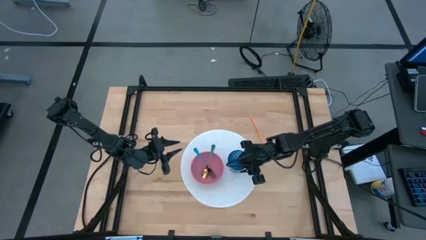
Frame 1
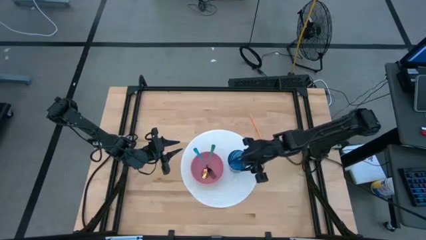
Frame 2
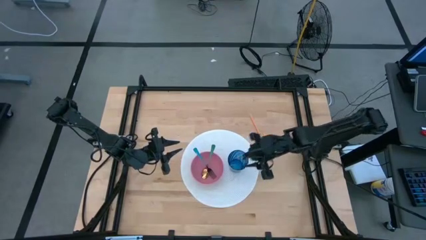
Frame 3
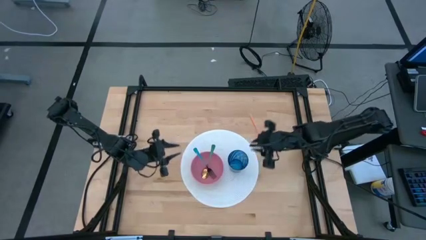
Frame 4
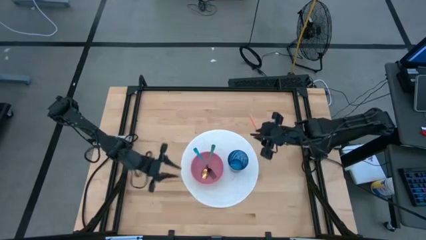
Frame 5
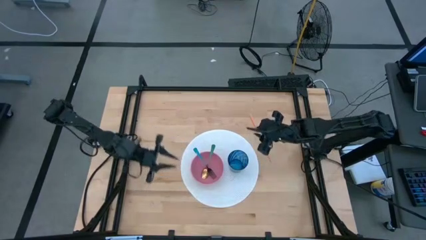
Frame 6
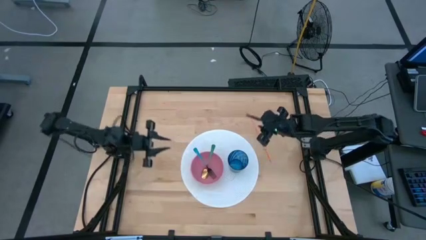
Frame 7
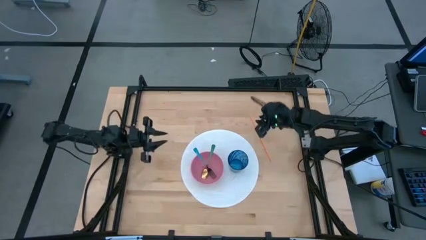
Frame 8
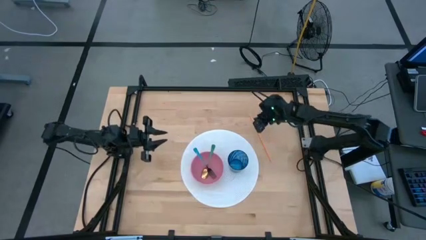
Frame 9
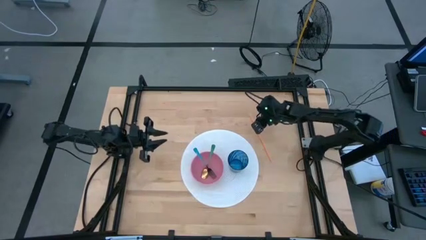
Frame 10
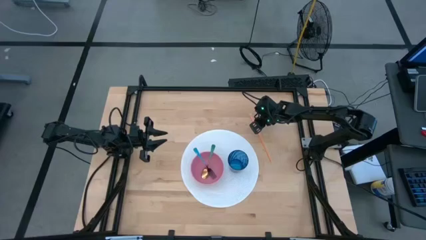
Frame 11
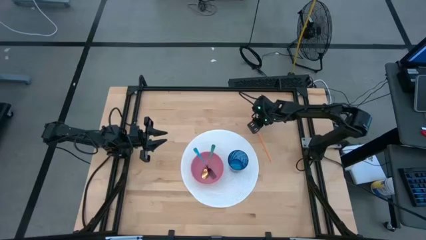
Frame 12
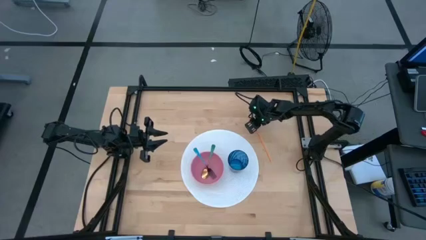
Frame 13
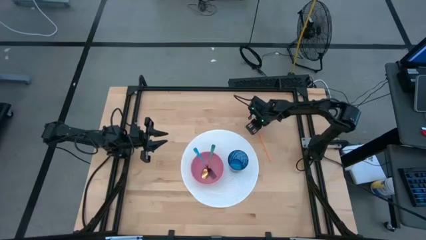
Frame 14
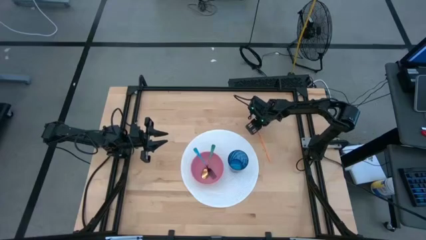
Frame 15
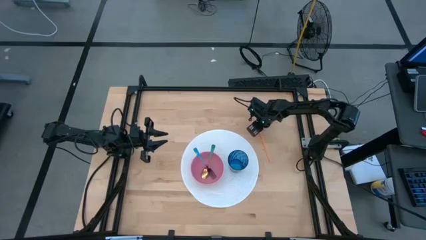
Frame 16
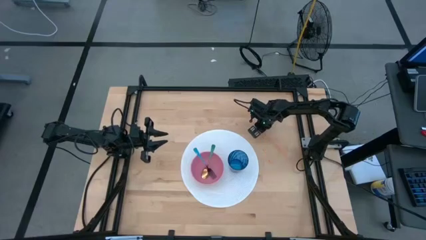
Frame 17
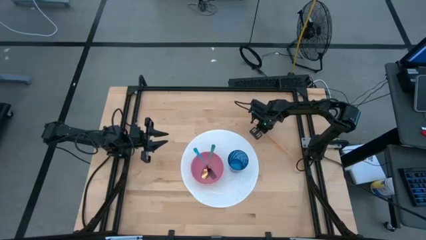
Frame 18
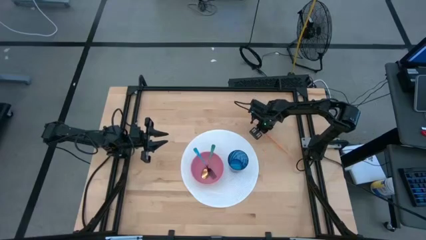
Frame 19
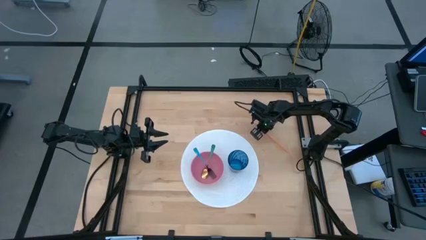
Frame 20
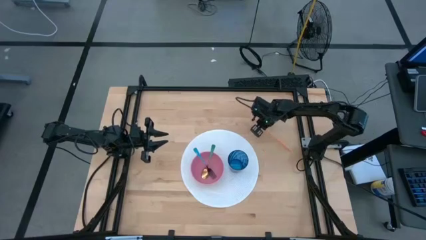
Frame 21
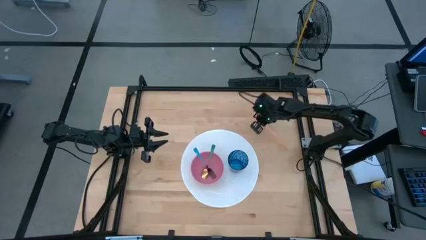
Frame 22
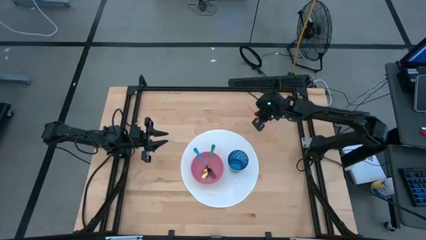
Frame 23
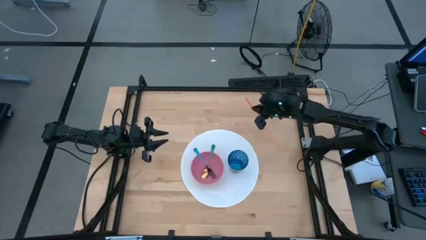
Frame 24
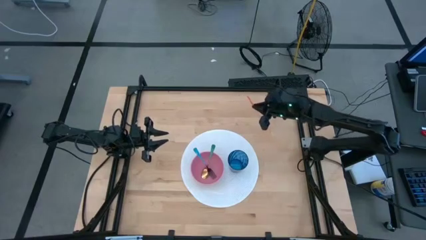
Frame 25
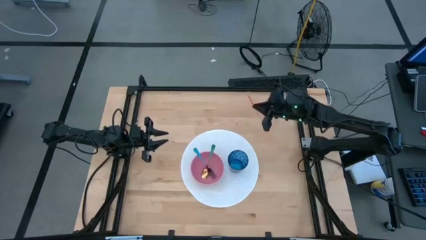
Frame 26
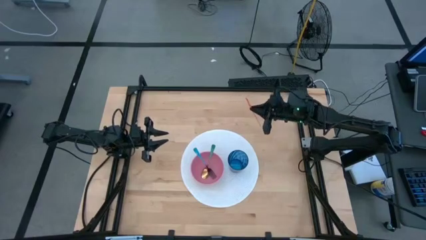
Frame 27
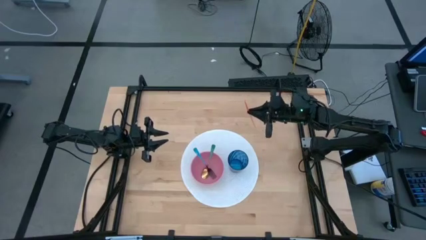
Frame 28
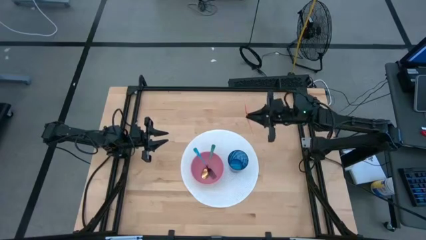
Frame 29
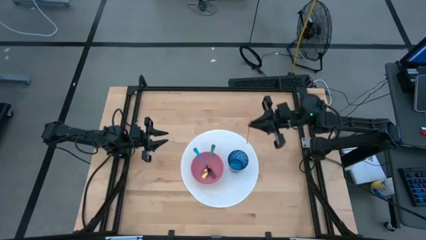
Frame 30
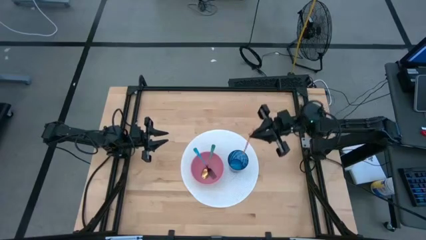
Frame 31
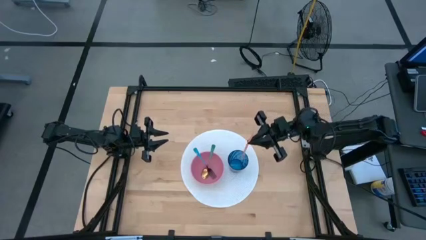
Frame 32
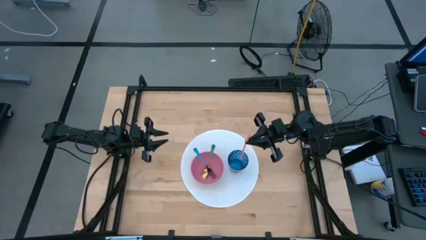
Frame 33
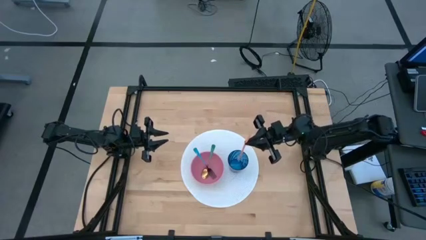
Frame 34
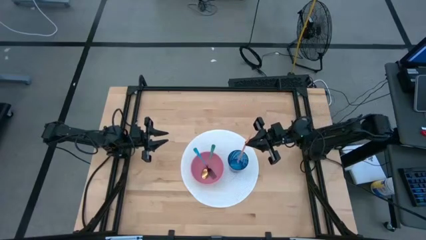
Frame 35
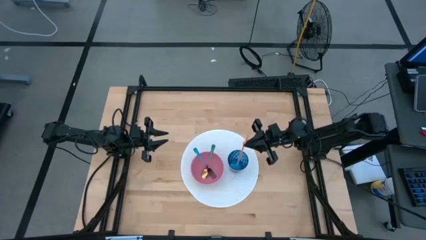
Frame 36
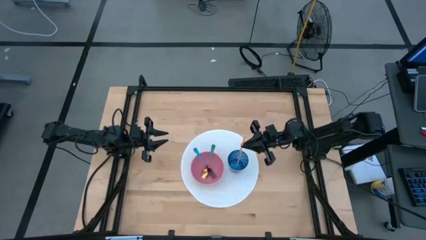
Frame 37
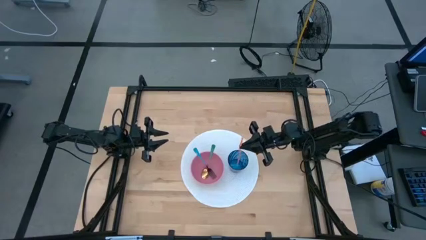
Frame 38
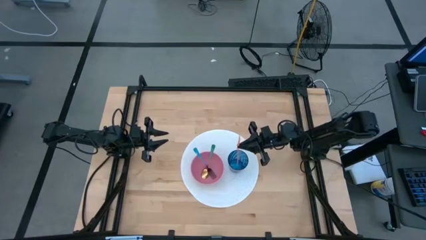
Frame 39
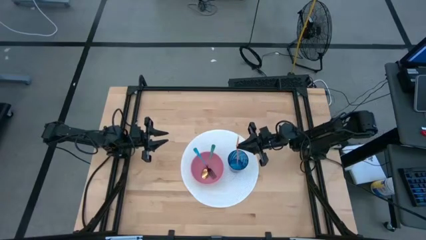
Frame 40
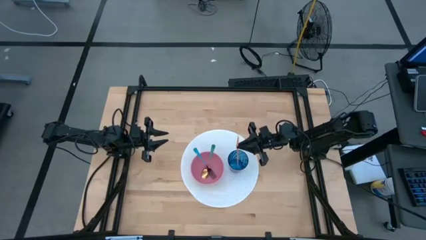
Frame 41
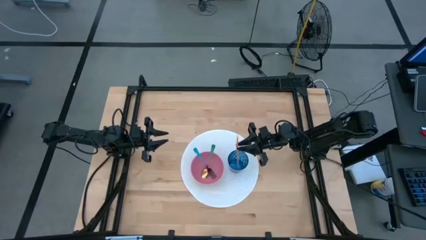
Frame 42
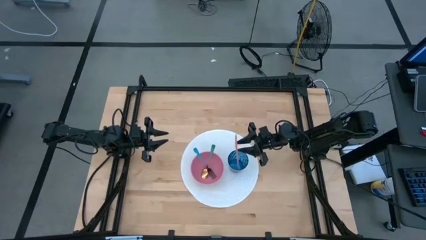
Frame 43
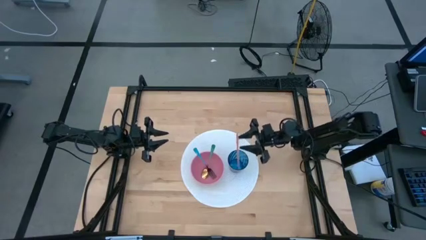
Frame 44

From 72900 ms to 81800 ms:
Task: Pick & Place Utensil
Put the orange straw into the blue cup

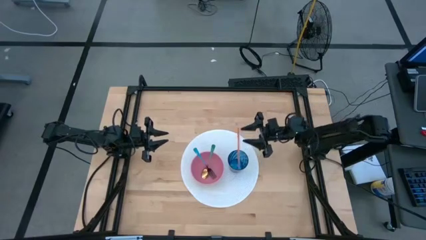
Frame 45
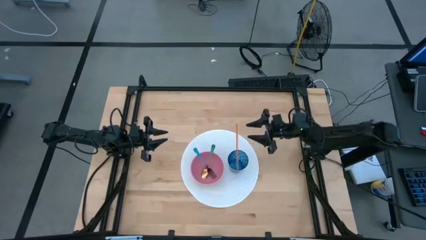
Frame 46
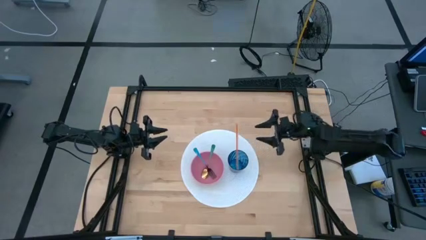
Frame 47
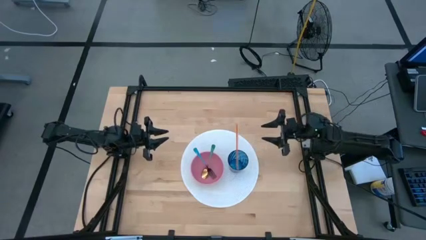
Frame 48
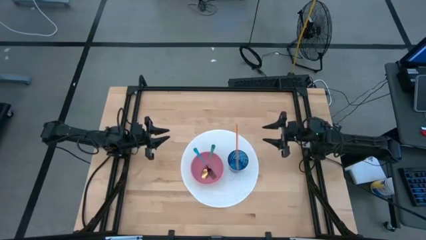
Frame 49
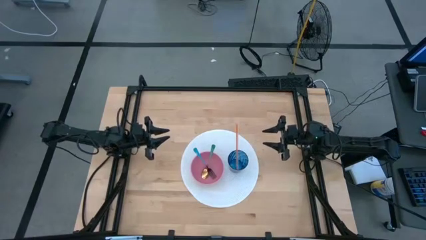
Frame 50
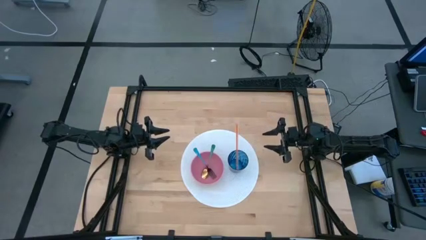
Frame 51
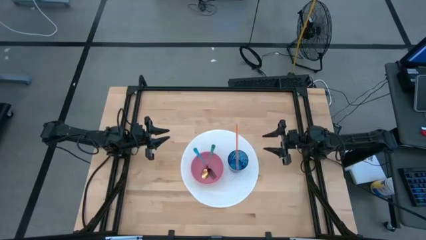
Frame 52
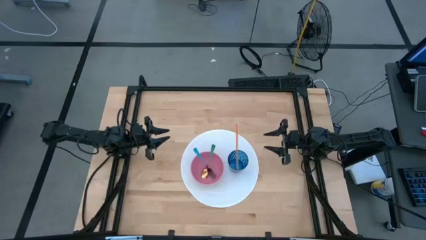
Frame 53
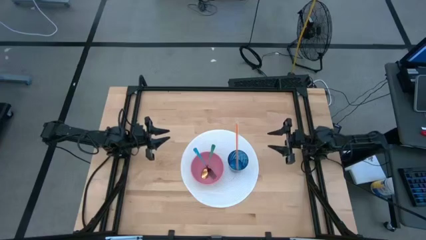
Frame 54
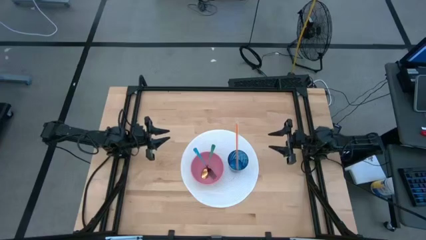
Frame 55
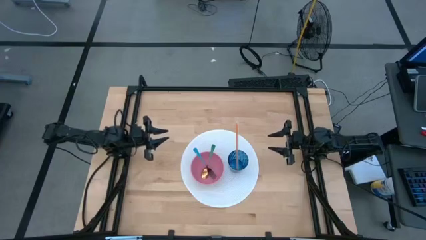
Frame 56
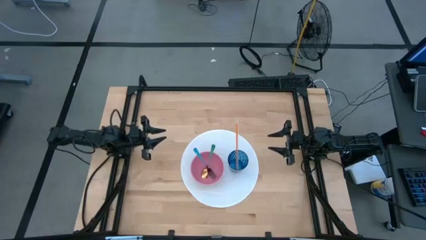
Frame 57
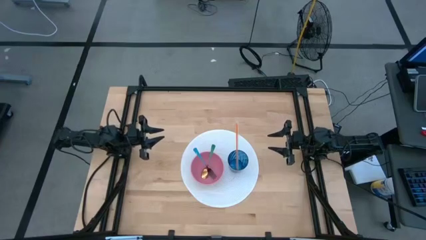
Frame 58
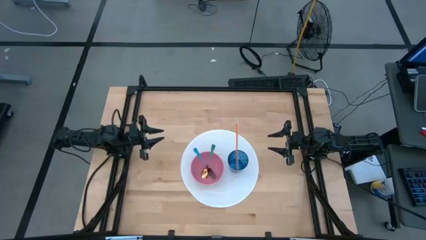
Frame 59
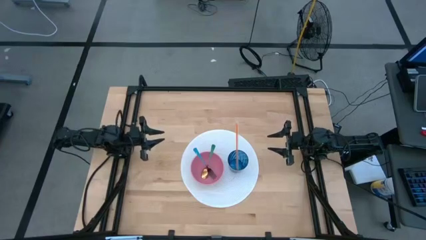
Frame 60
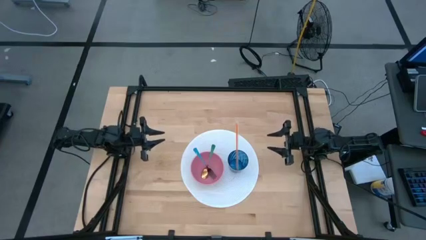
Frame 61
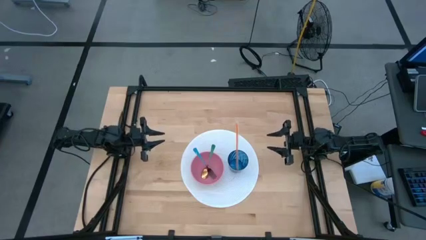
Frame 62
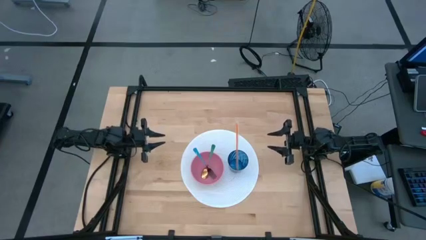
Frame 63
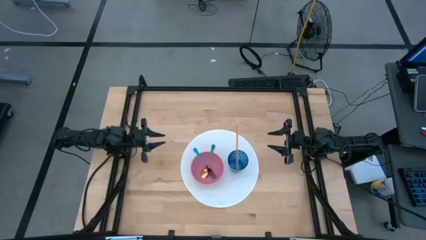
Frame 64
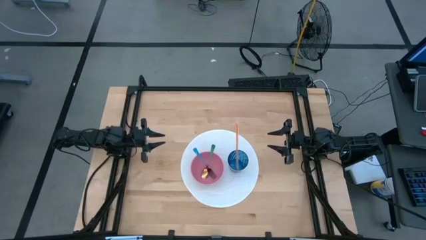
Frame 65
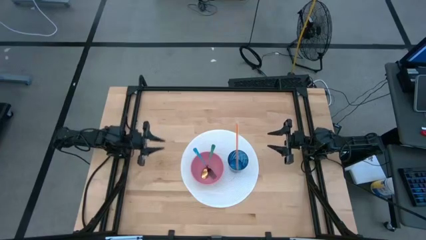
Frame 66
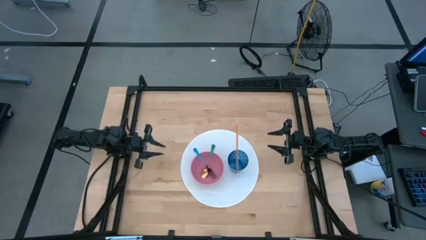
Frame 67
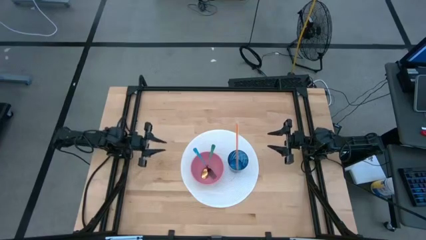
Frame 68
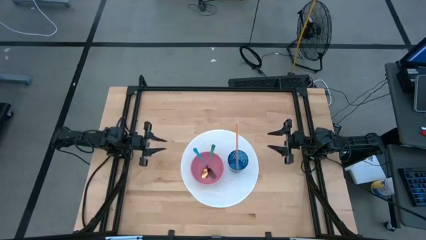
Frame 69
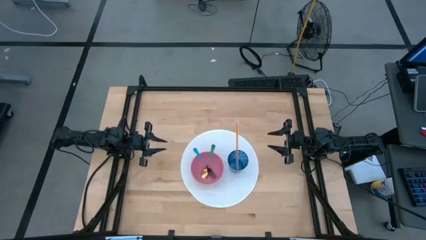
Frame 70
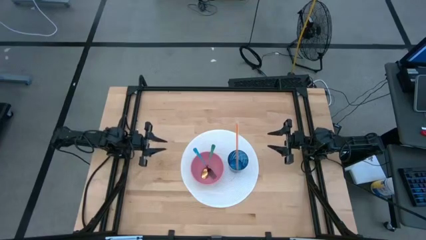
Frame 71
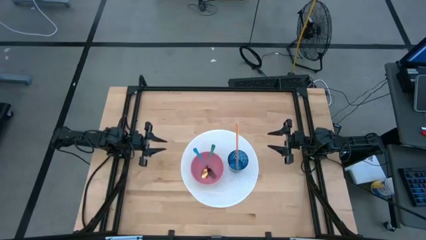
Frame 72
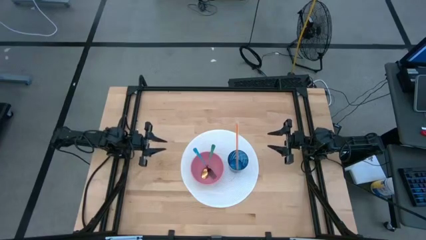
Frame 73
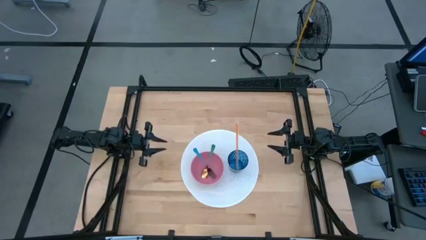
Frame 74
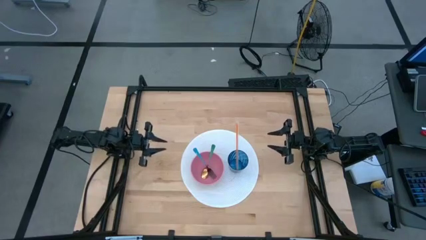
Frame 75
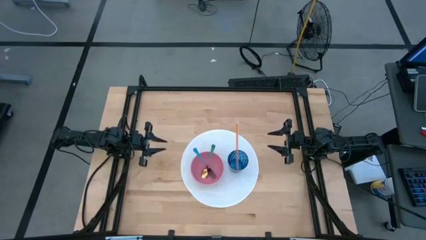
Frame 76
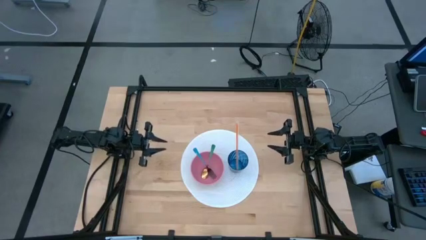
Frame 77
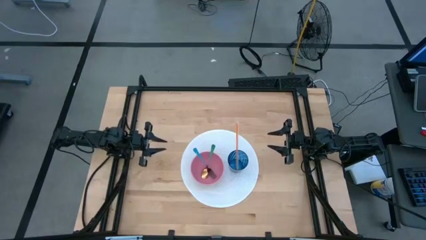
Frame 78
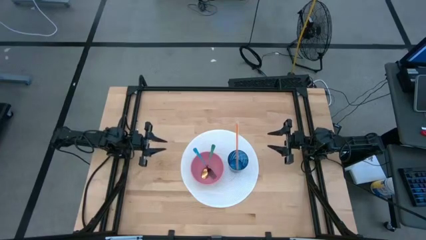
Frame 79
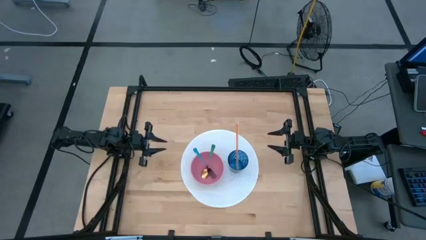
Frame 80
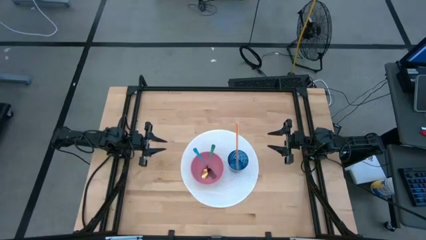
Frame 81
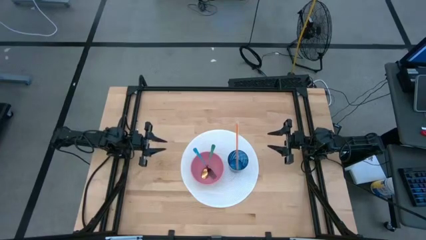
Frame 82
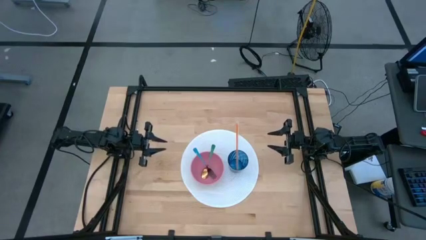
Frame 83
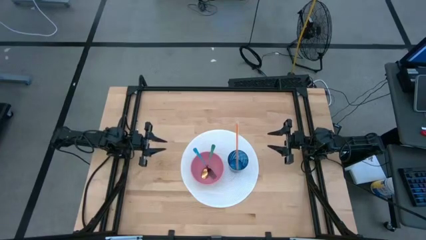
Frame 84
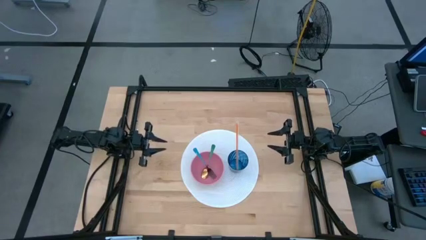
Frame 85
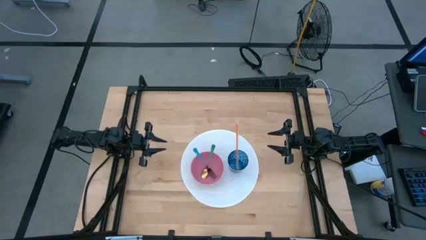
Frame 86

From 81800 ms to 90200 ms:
Return to Home Position
